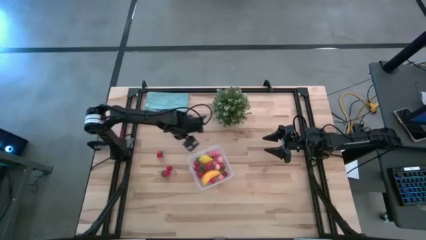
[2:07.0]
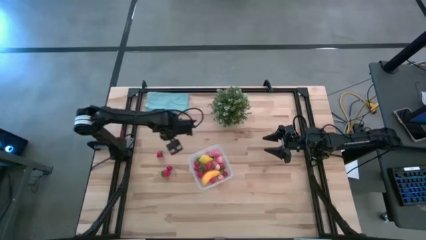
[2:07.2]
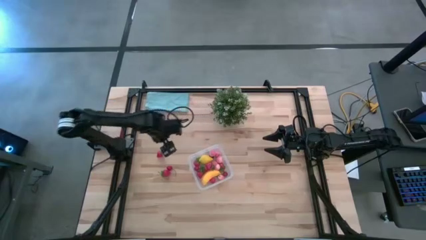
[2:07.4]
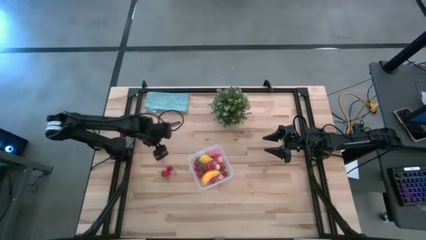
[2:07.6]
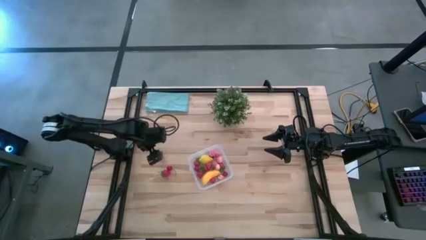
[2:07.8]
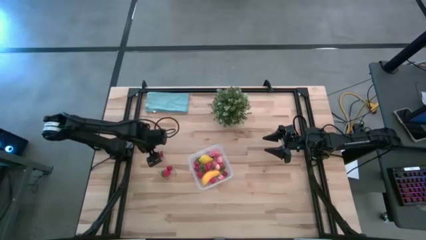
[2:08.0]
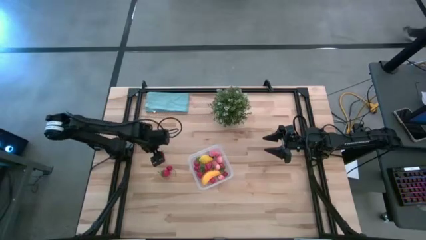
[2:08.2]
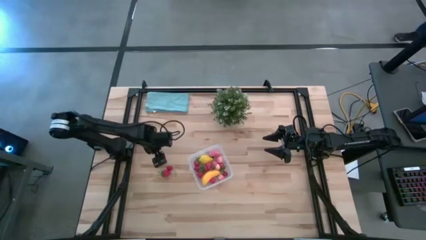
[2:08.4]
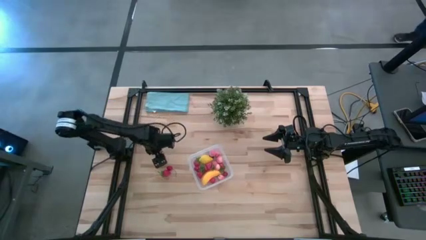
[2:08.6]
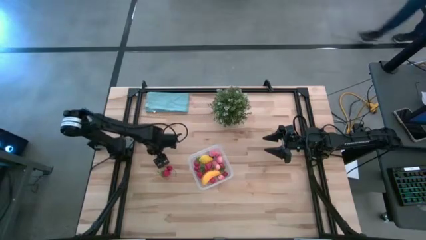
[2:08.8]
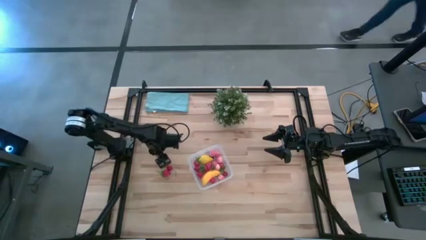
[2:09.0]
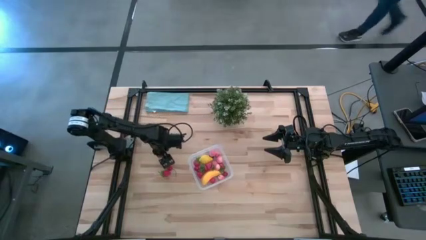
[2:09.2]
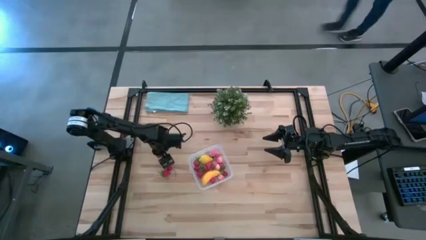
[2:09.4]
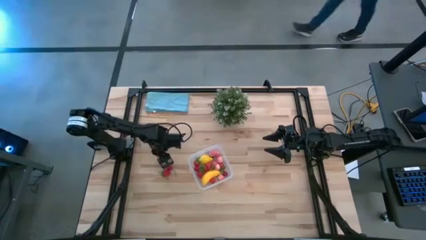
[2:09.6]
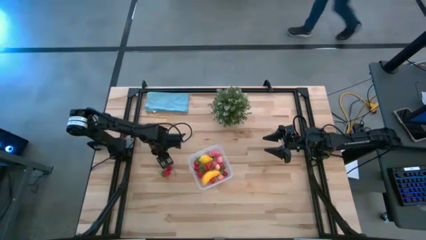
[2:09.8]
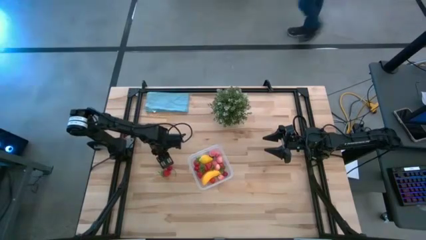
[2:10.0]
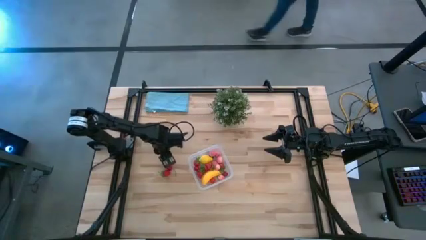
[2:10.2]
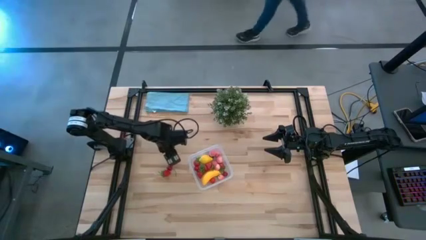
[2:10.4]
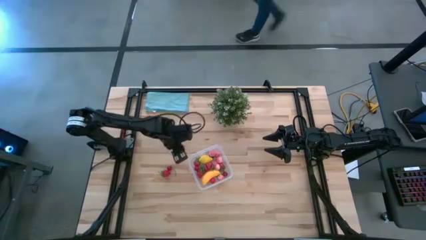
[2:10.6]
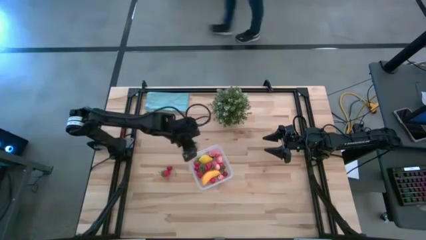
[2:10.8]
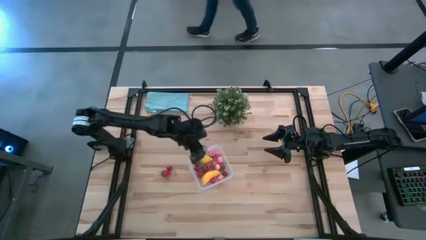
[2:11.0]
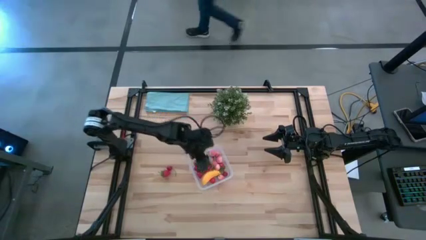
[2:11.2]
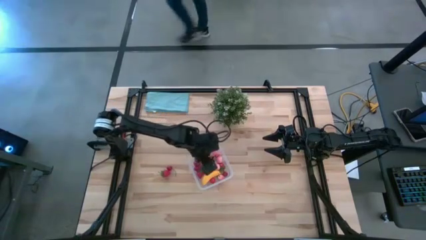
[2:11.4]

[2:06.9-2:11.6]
Task: Pick and placing Produce into tupperware
Put the red strawberry into the transparent bin

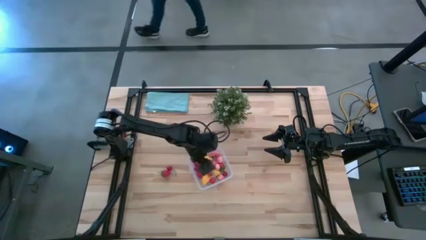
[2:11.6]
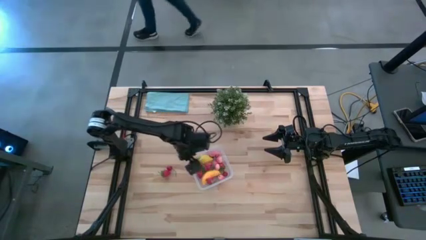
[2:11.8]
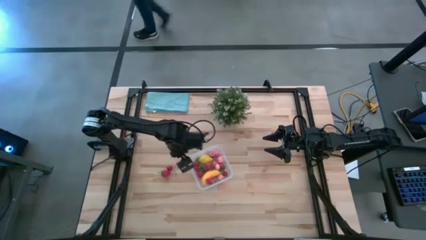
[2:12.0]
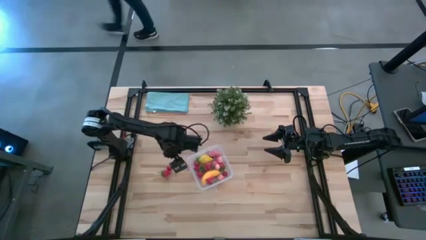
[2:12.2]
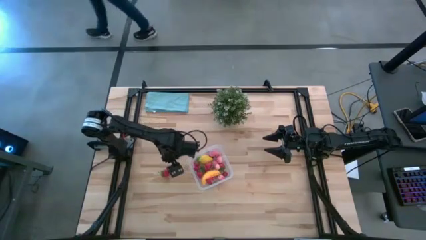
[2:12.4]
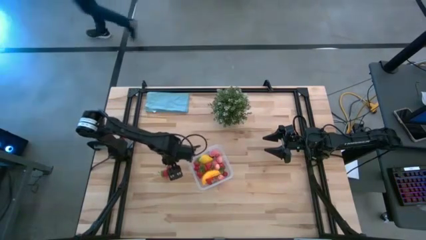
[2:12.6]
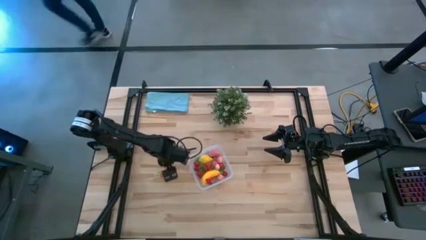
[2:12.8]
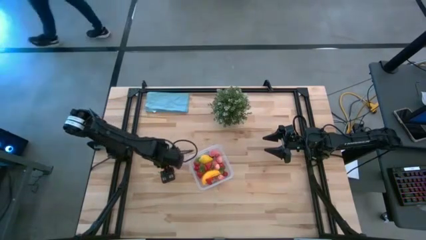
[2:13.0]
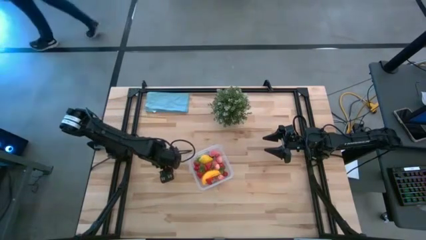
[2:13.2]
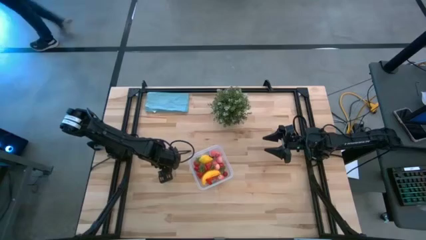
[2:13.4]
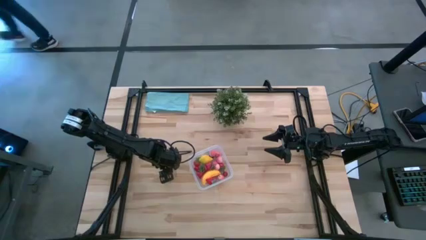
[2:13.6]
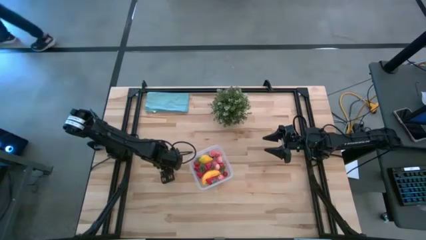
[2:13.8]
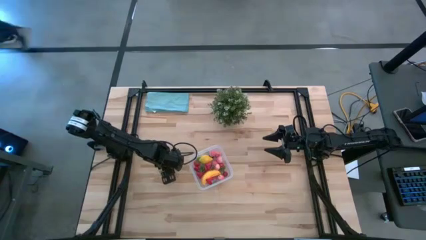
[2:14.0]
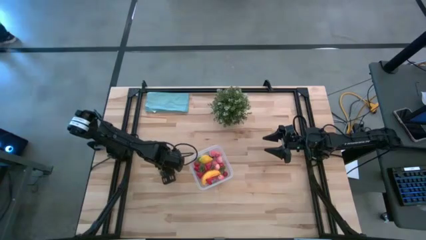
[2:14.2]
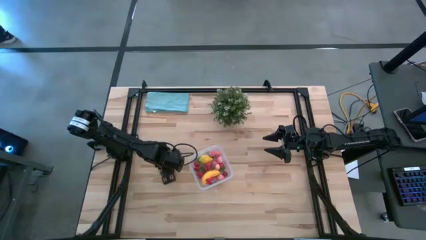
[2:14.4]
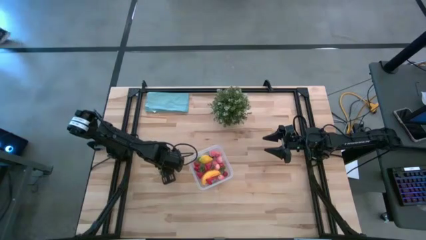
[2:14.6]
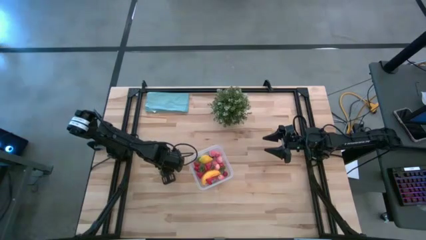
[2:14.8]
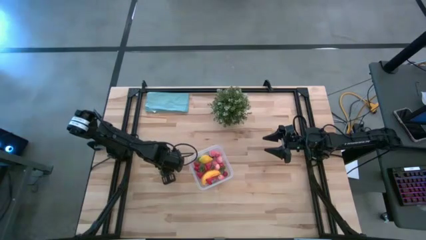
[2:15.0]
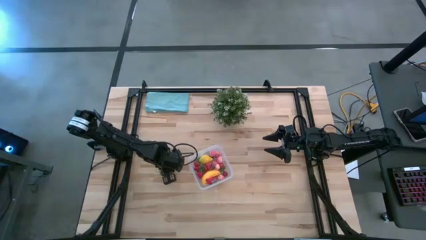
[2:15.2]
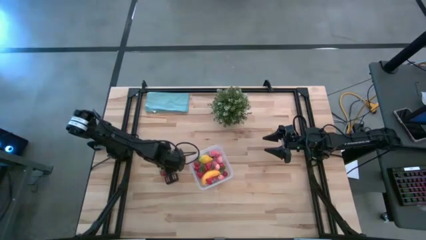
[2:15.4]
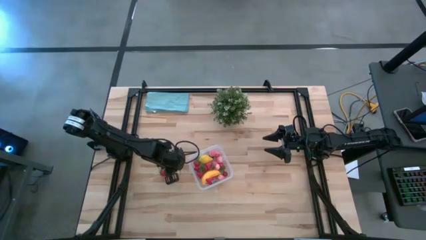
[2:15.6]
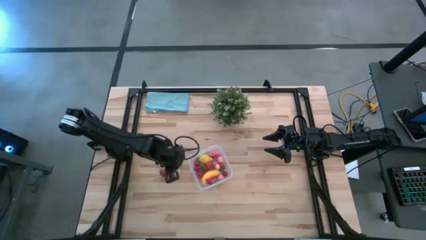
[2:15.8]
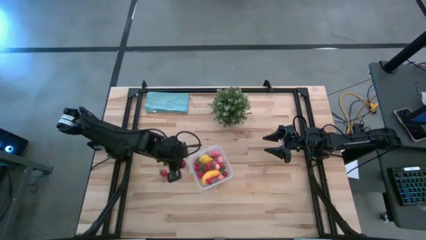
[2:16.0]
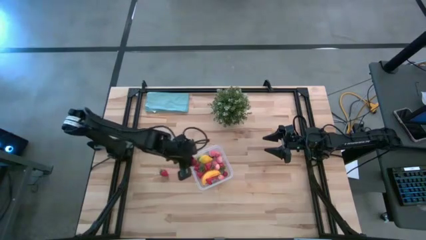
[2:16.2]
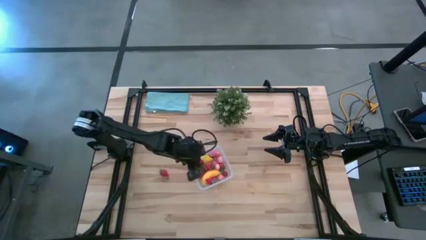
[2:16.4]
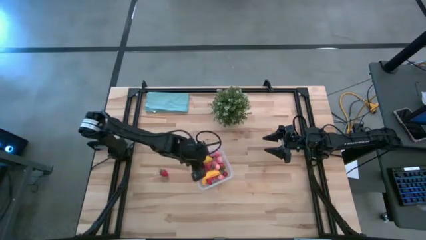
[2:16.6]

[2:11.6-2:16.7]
Put the red cherry into the transparent bin

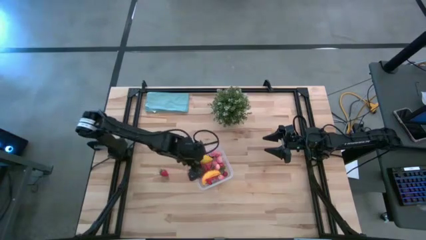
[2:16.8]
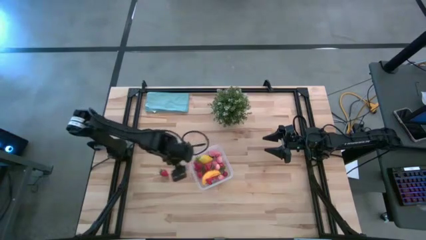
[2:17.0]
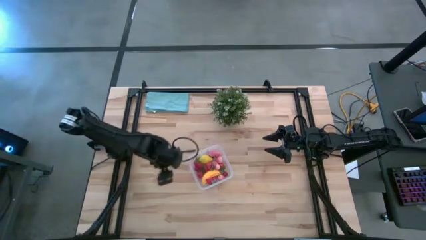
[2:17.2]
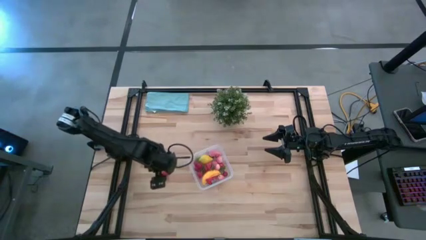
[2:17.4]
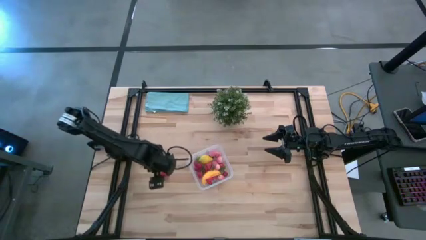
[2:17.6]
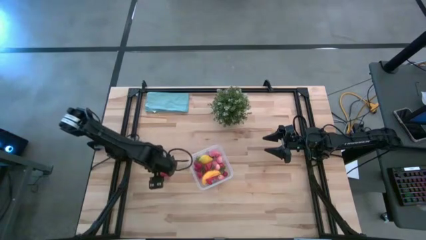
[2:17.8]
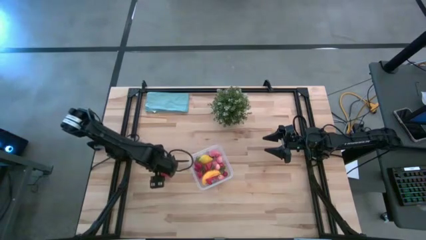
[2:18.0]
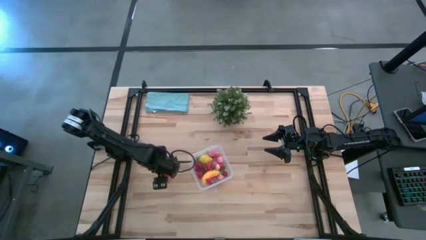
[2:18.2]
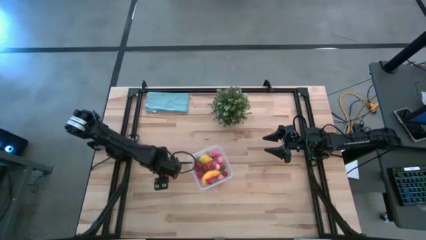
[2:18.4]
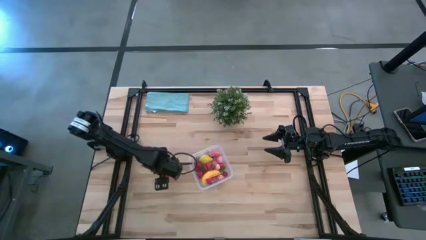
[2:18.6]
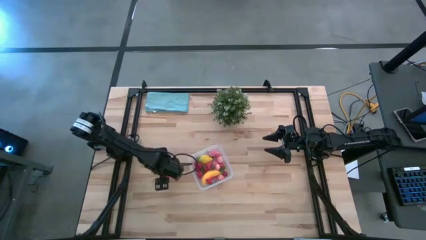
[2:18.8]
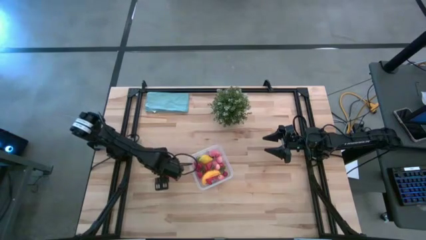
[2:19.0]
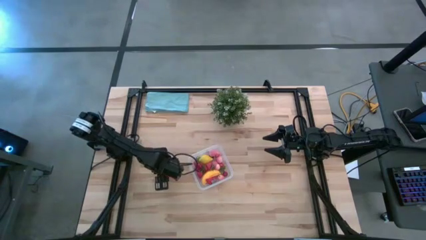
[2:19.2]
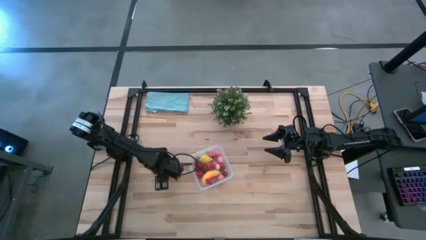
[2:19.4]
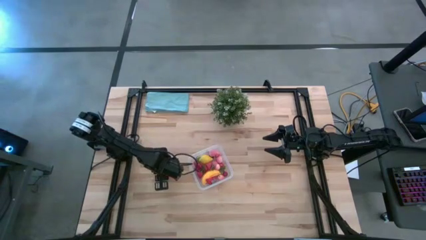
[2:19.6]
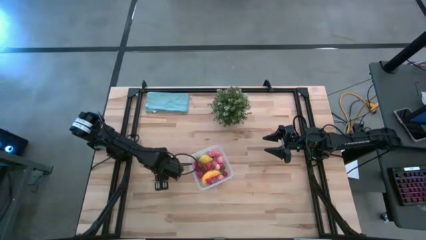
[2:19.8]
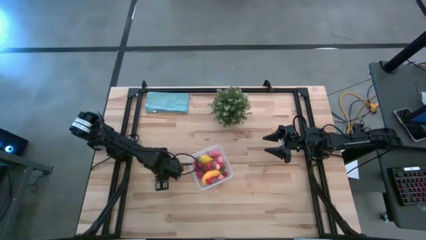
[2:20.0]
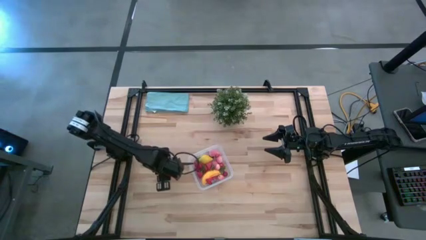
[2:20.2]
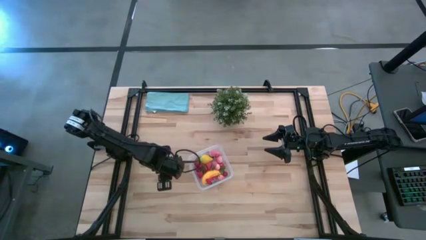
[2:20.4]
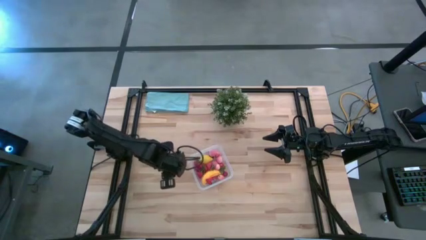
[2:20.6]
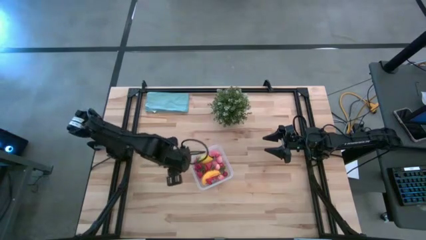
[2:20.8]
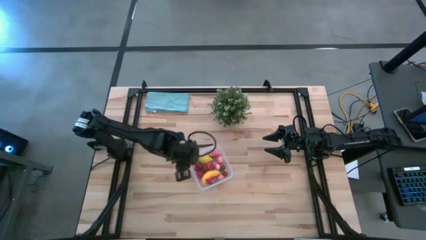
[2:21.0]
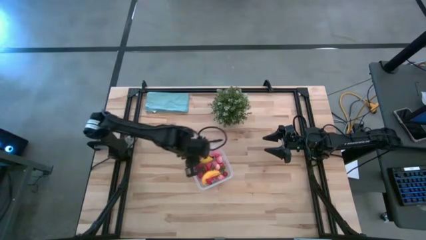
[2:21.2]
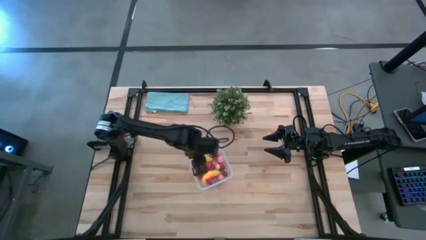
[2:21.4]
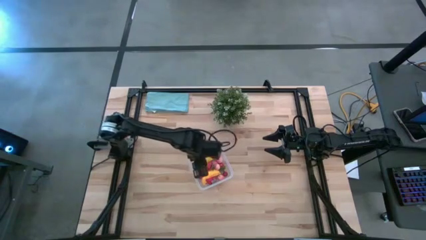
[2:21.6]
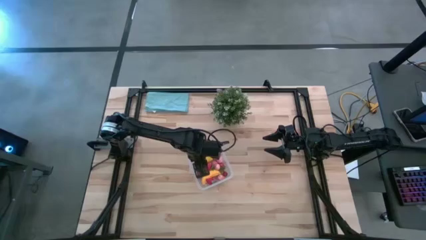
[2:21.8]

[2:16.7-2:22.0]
Put the red strawberry into the transparent bin

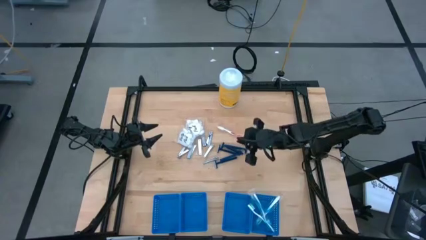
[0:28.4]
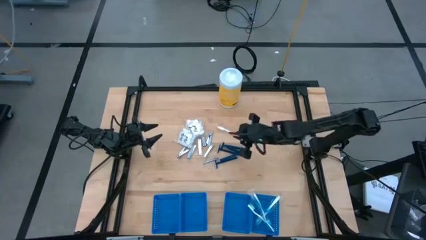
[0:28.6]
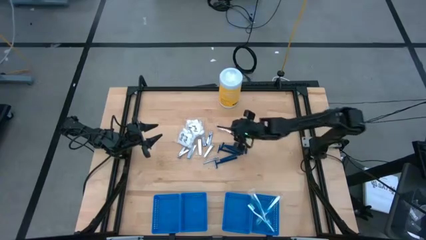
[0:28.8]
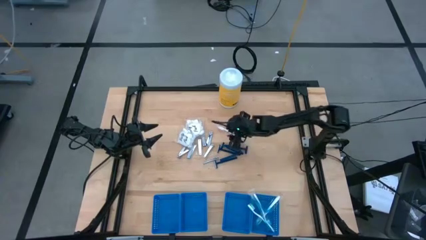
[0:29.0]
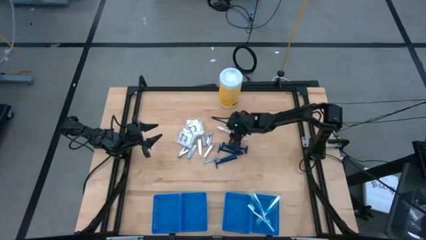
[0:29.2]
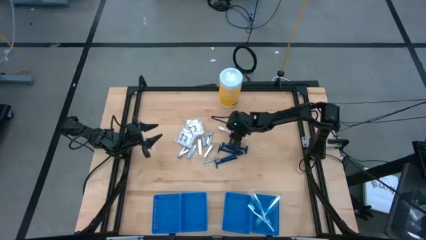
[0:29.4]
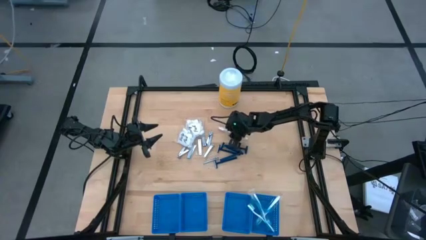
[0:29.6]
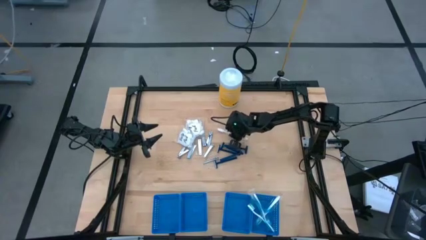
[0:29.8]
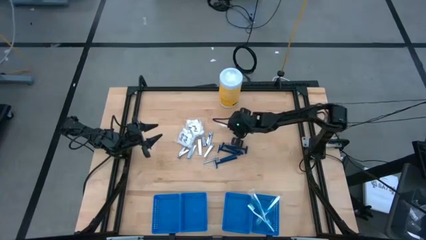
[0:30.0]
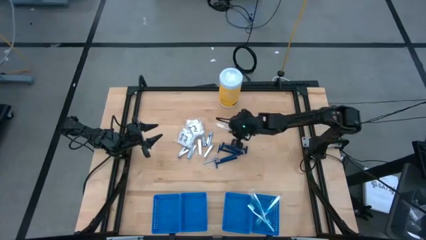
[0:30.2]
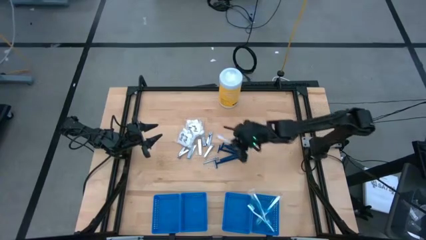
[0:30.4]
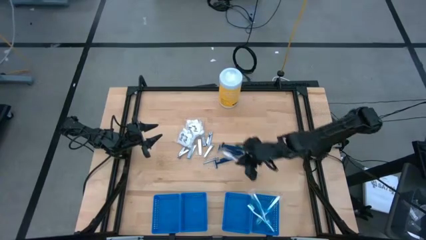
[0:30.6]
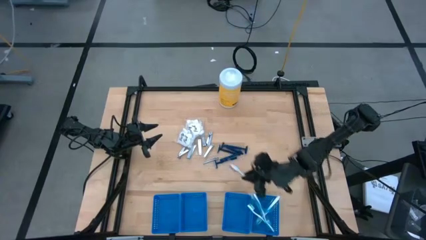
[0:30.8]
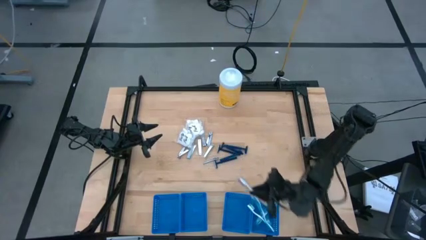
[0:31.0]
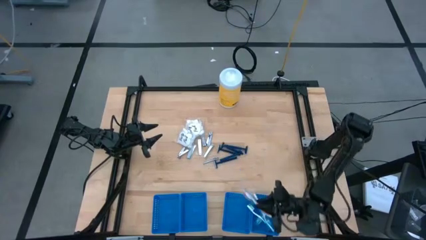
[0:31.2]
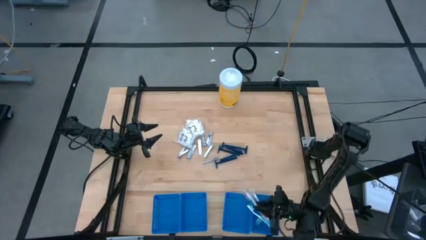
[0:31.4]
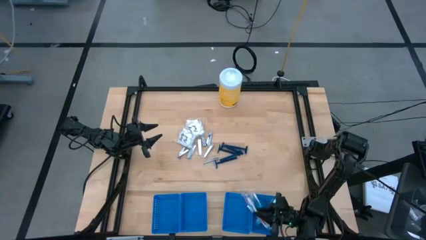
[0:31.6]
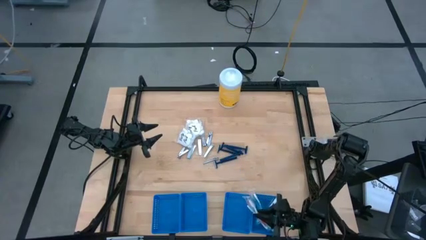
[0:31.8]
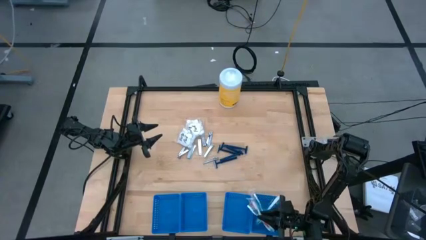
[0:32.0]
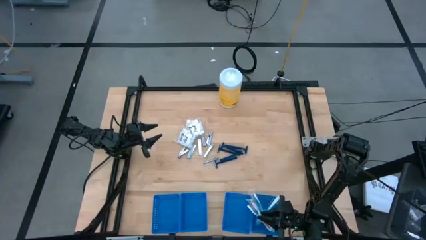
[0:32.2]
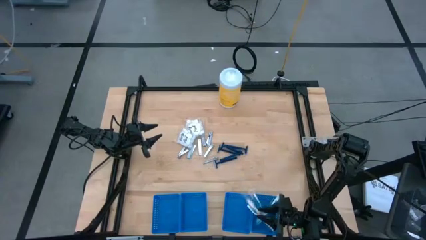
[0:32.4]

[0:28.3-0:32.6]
Task: Pick & Place Travel size toiletries
Put the orange toothbrush into the blue basket
